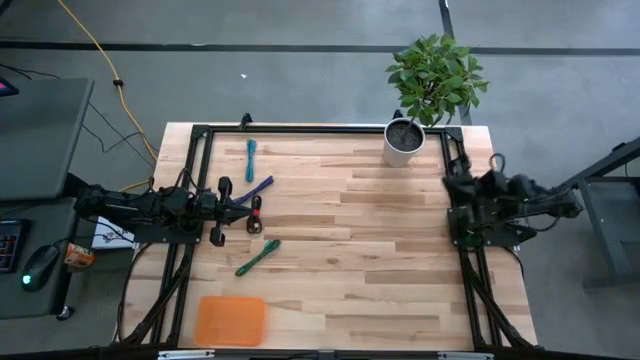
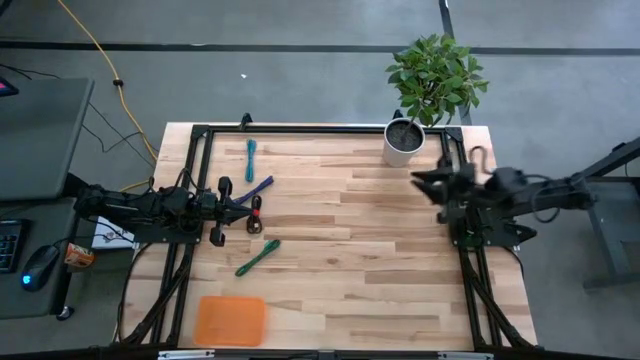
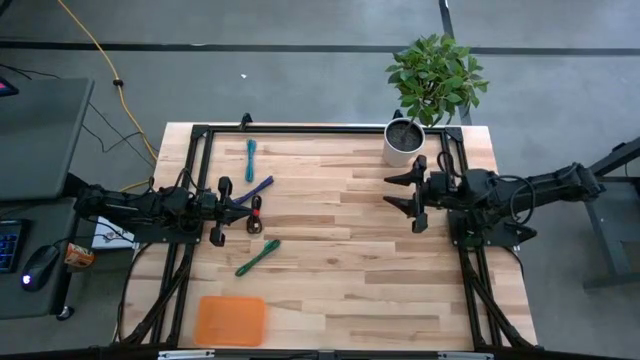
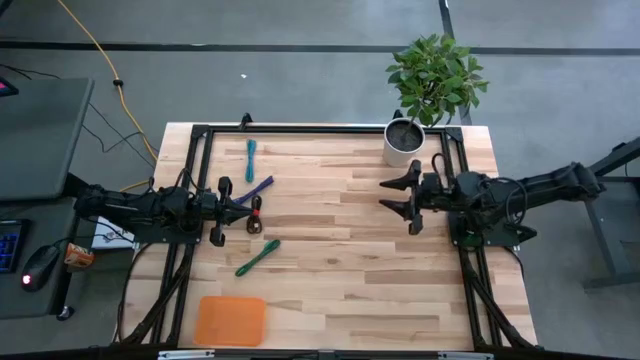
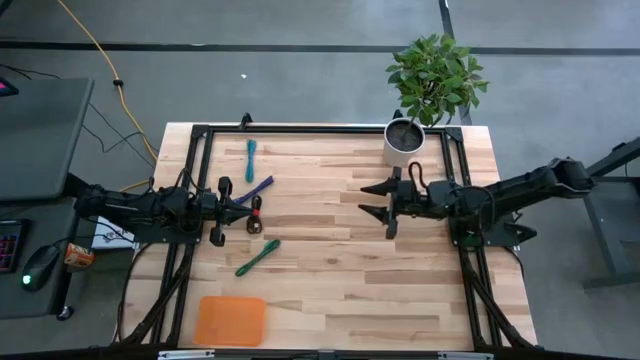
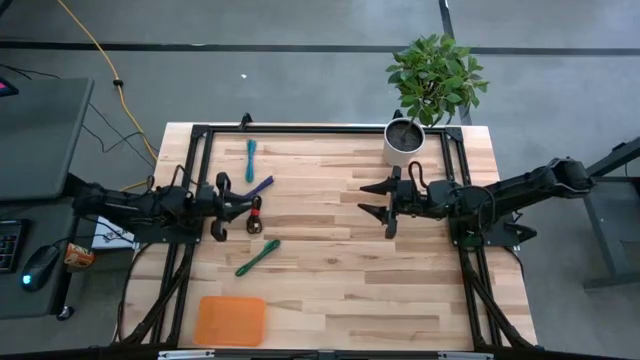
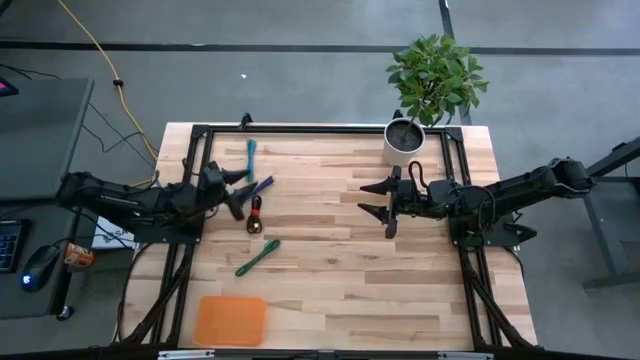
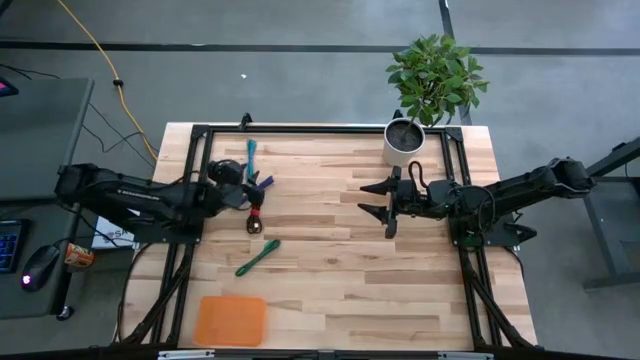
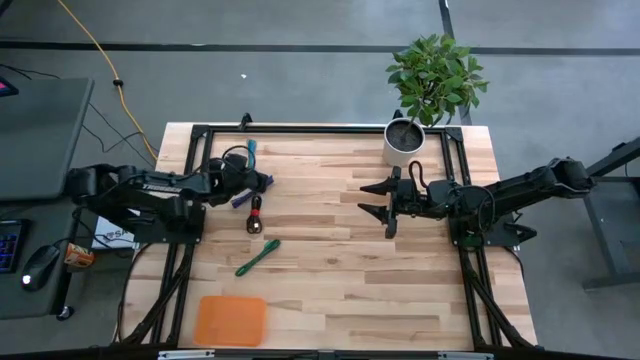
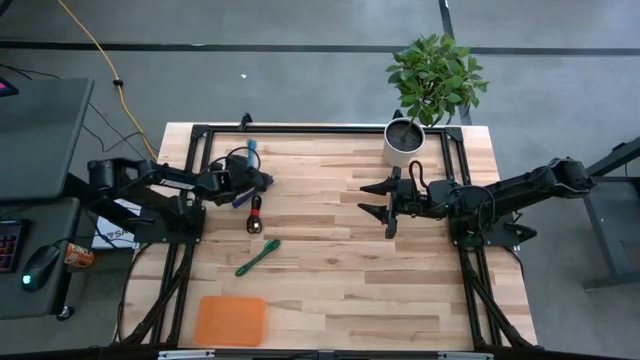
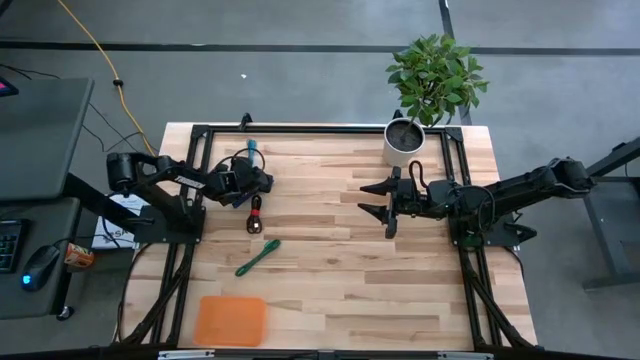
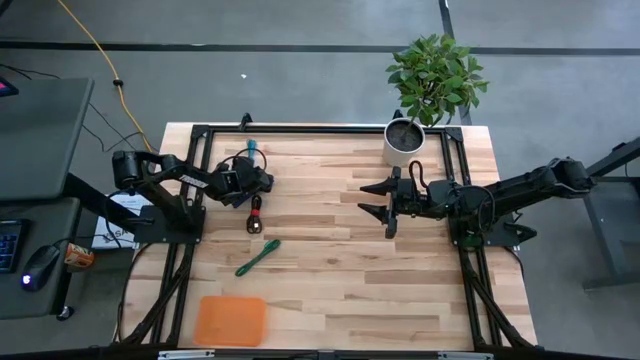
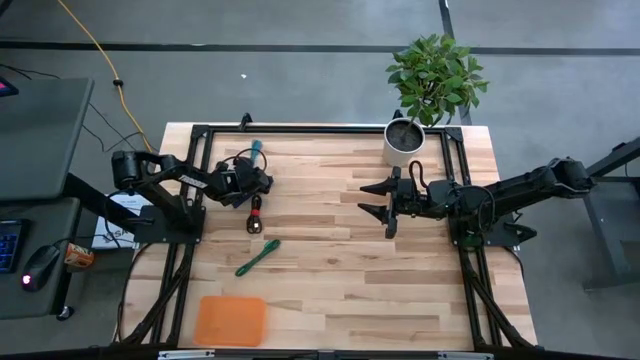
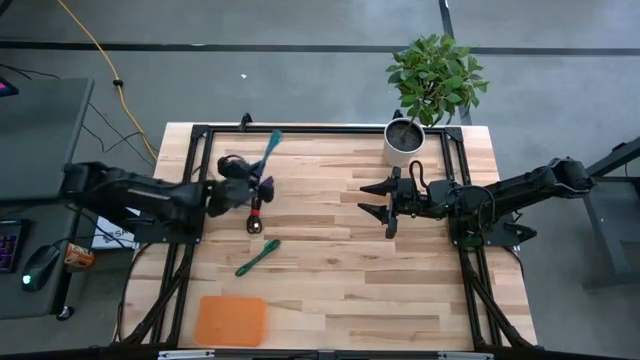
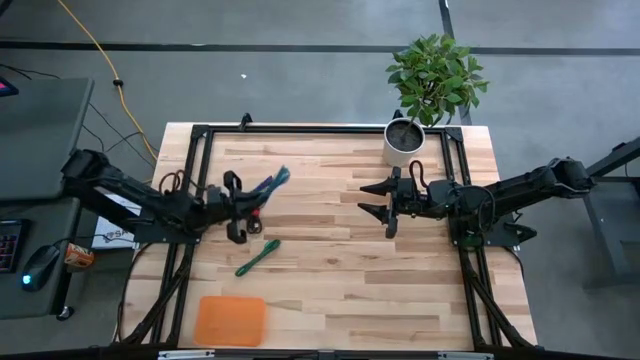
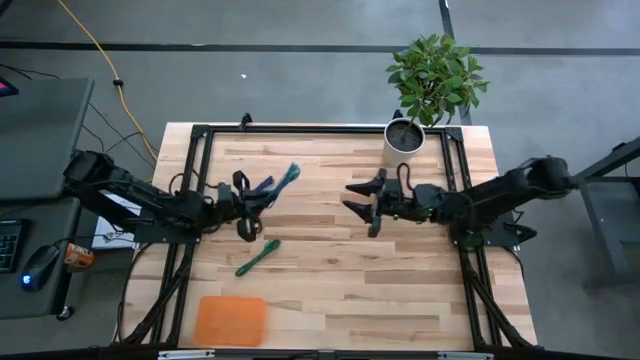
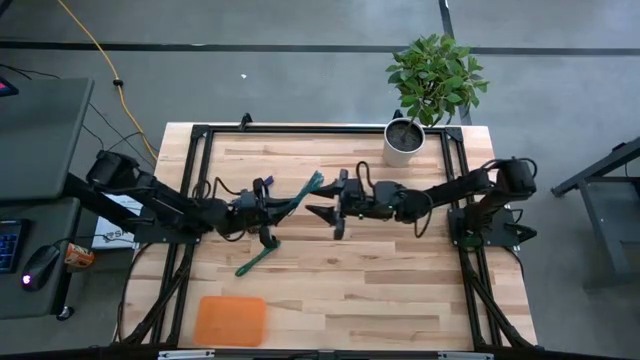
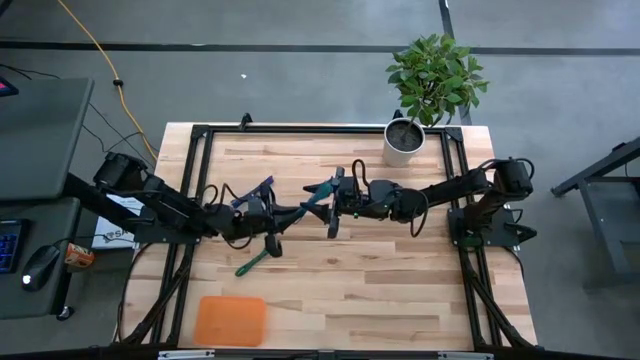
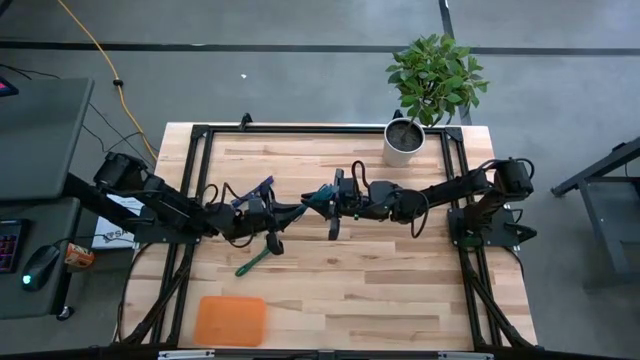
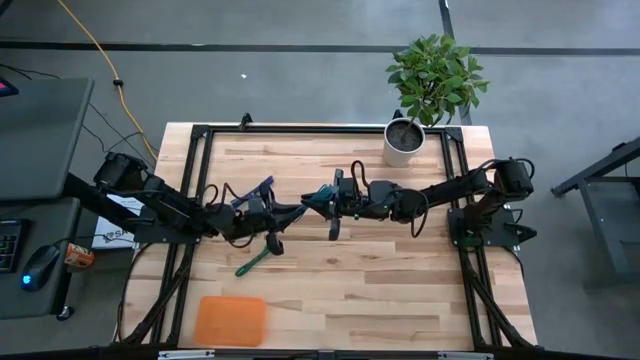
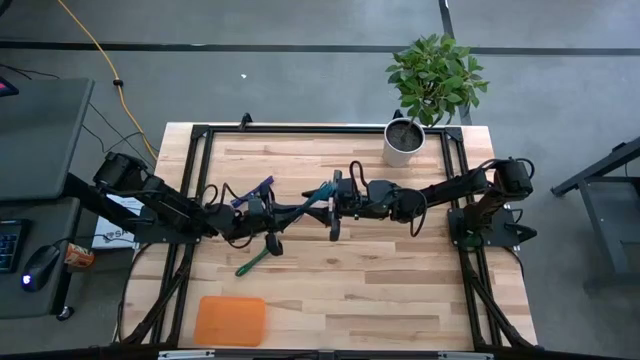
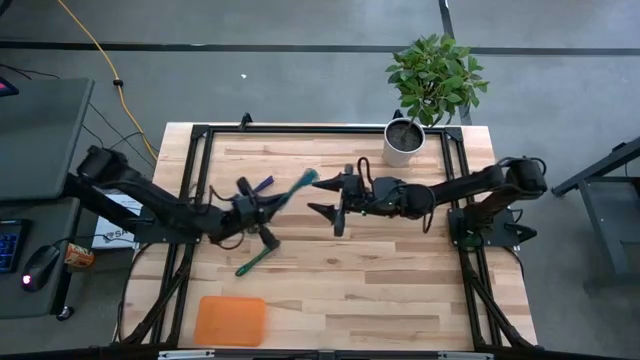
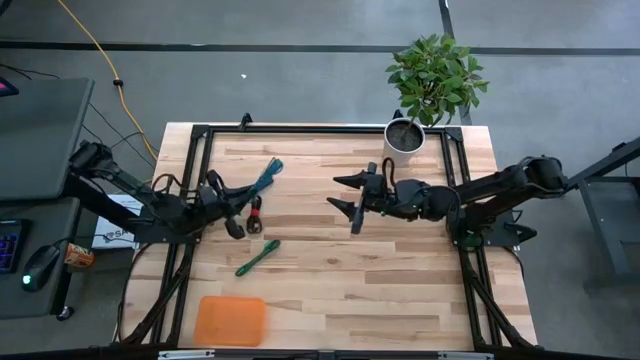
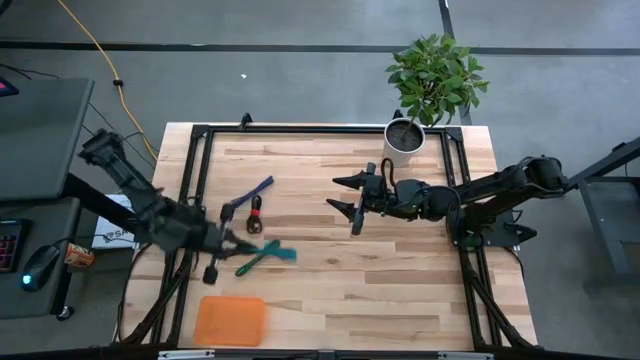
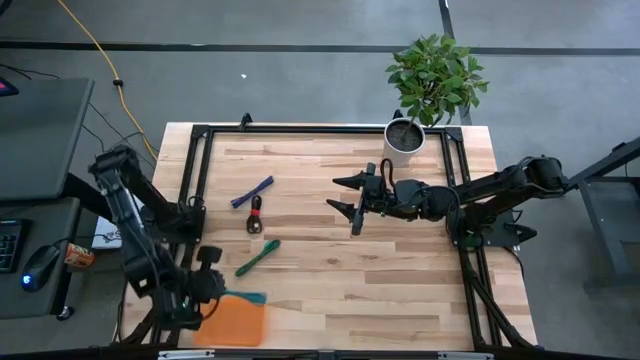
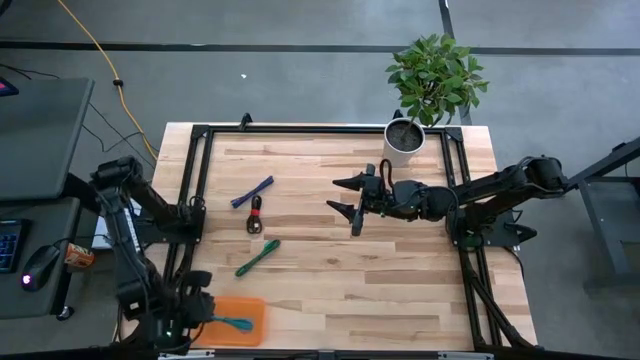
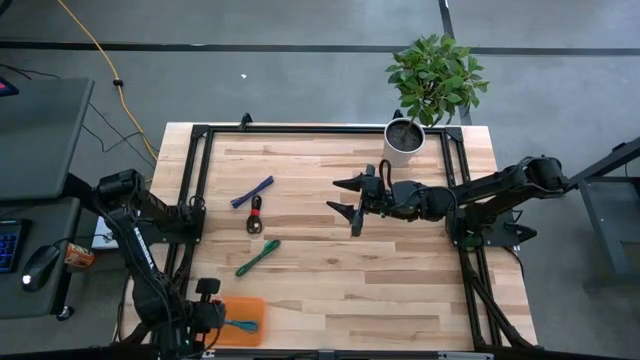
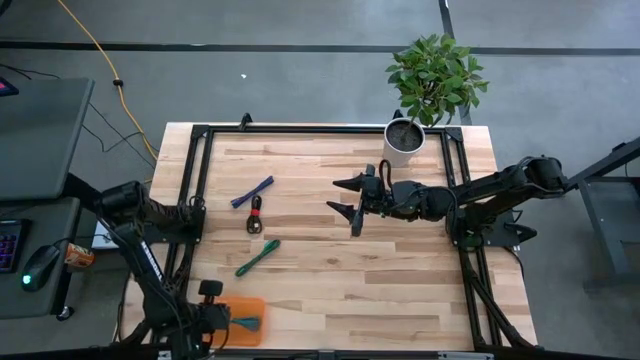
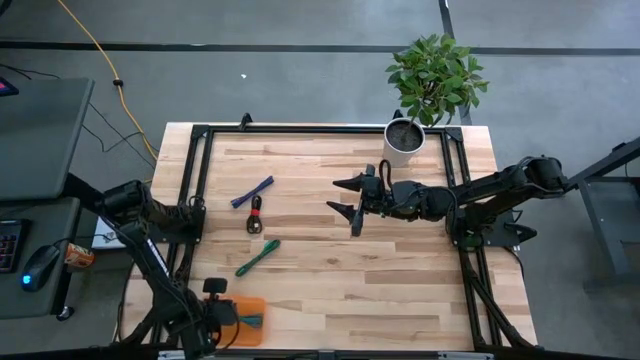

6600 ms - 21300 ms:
Task: Pick and place USB-C Cables
Put the blue charger cable into the orange bin

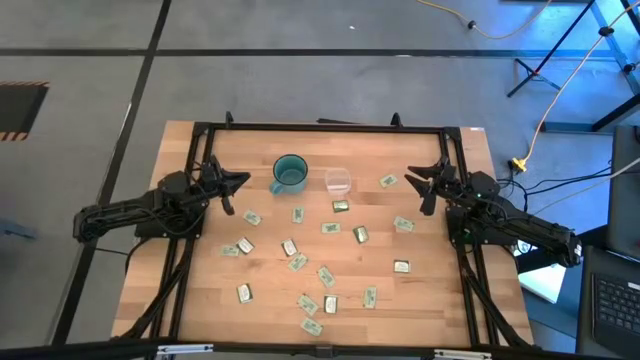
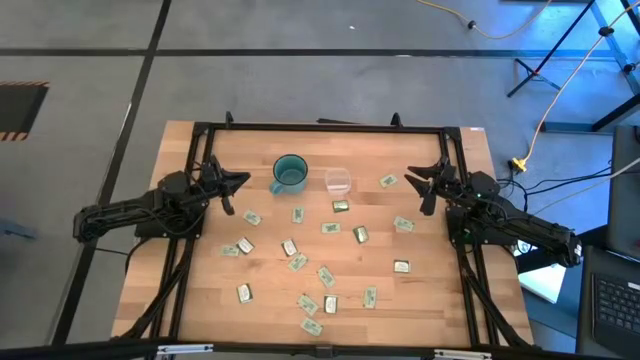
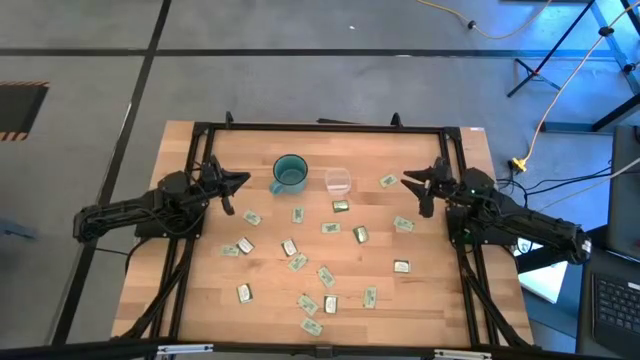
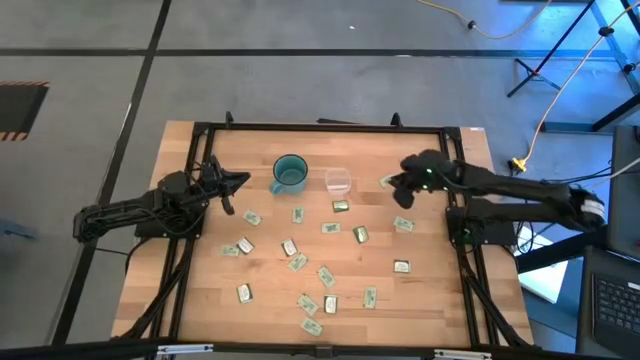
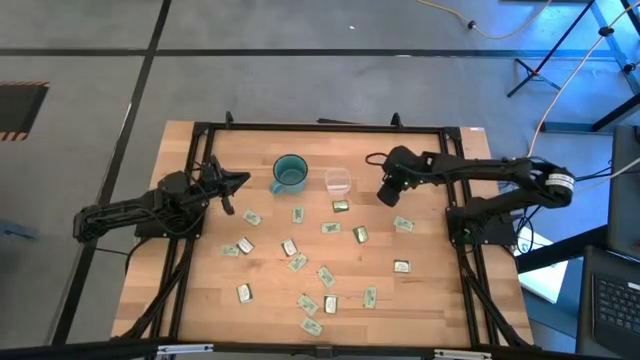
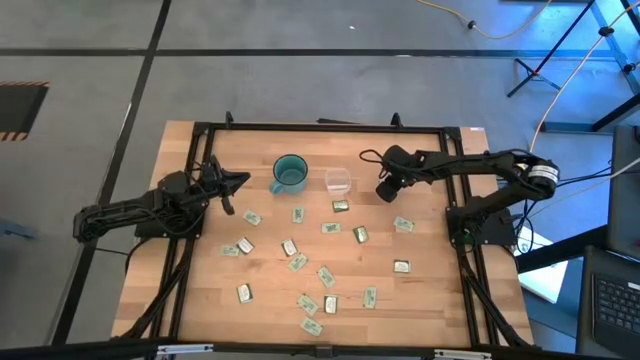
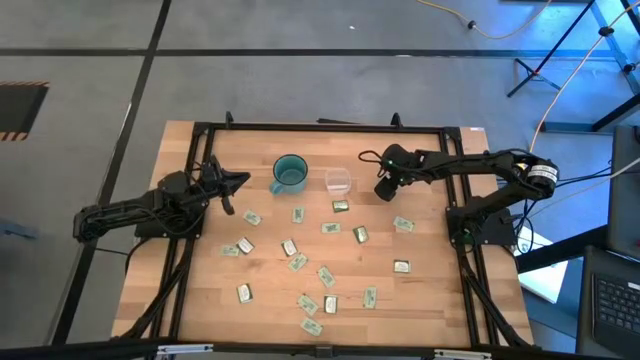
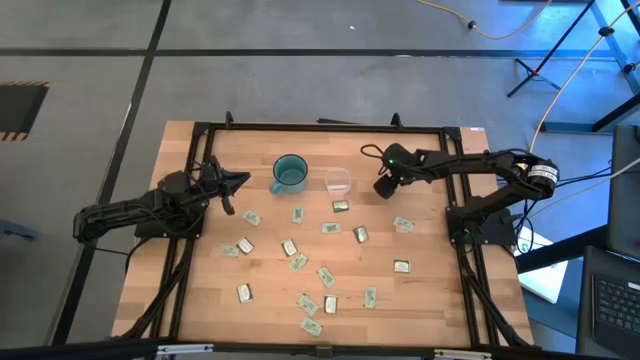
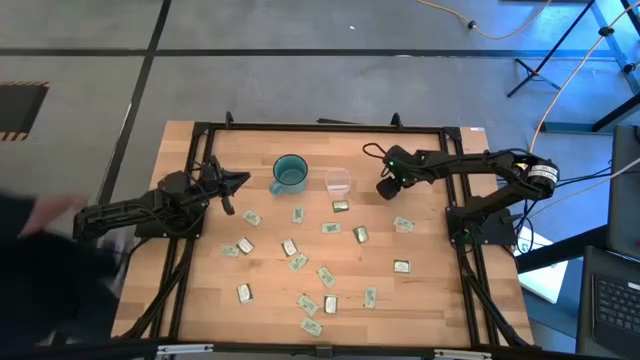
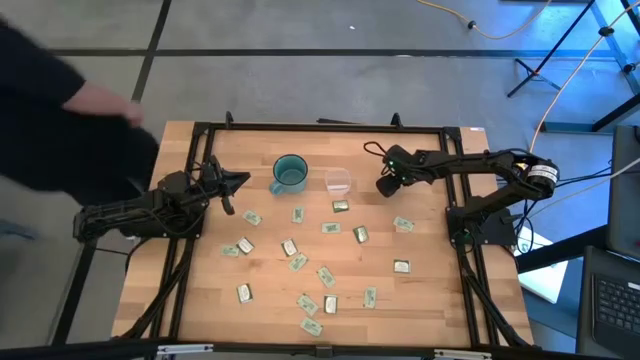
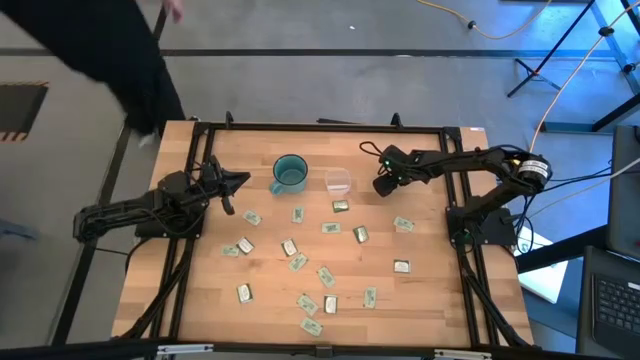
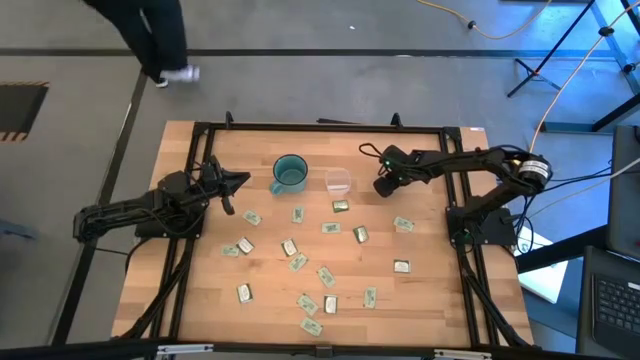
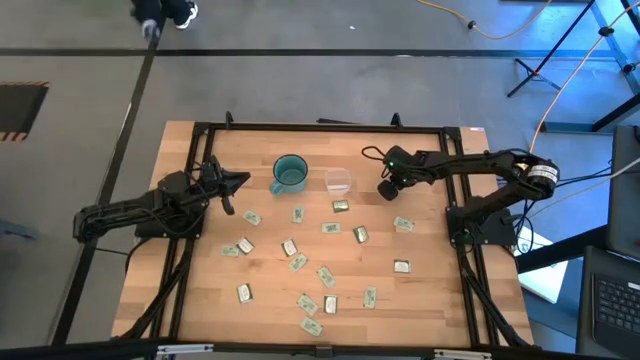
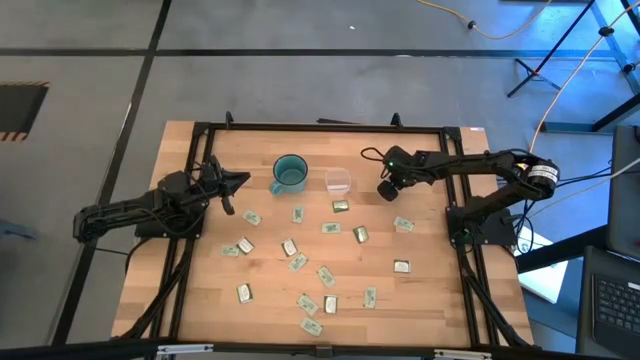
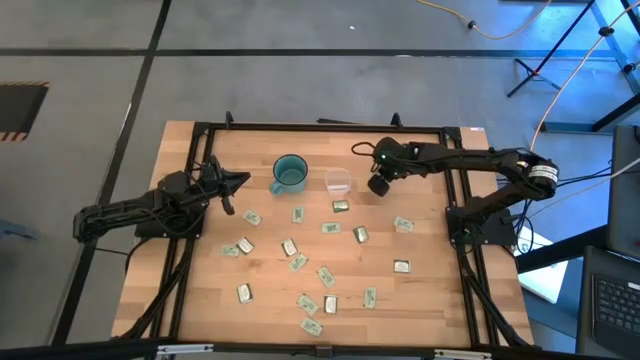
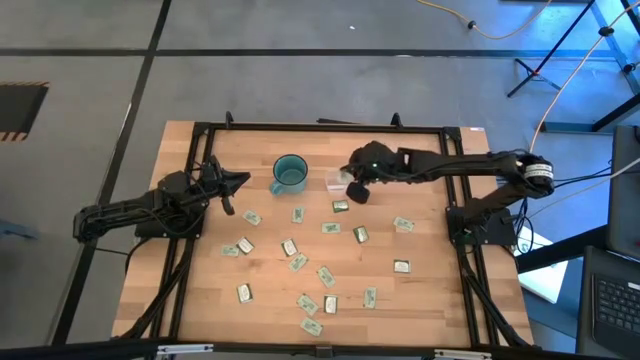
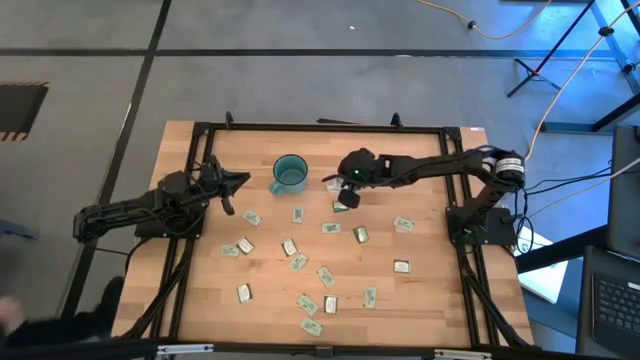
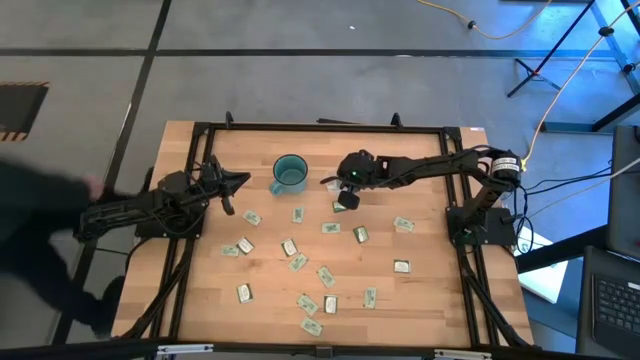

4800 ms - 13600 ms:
Task: Pick and place items into bin
Put the white stevia packet into the transparent bin
